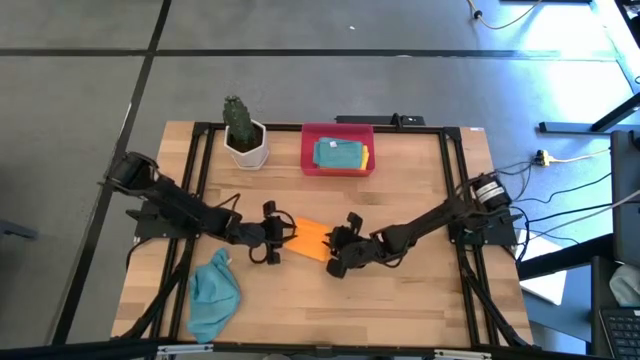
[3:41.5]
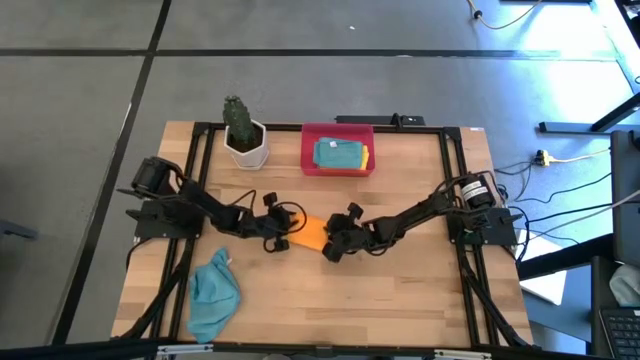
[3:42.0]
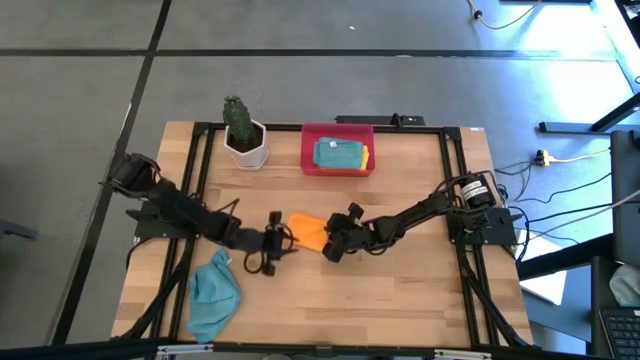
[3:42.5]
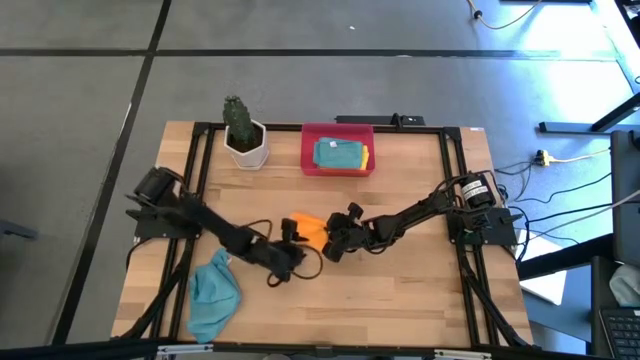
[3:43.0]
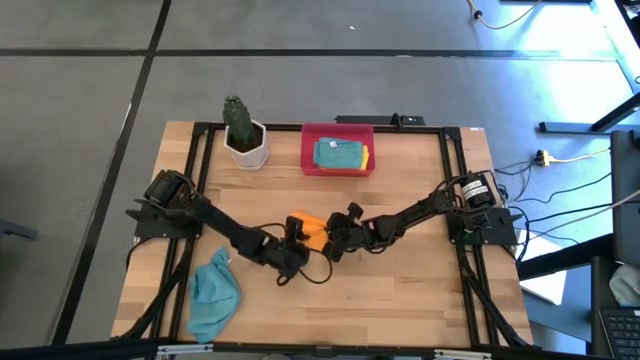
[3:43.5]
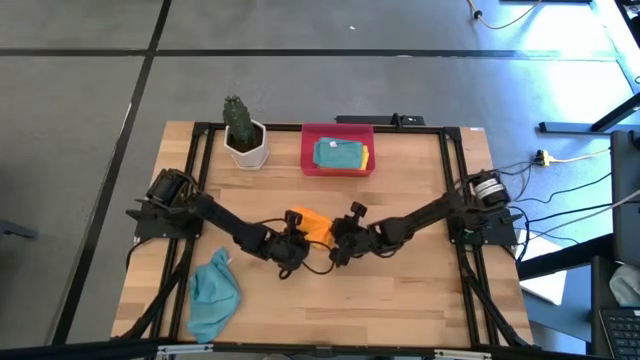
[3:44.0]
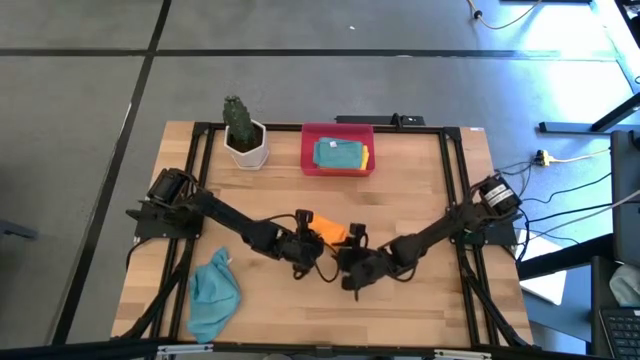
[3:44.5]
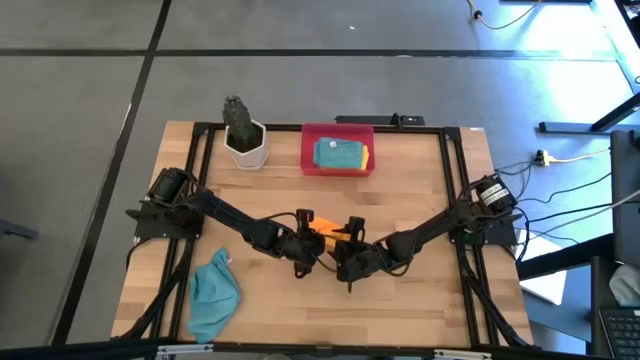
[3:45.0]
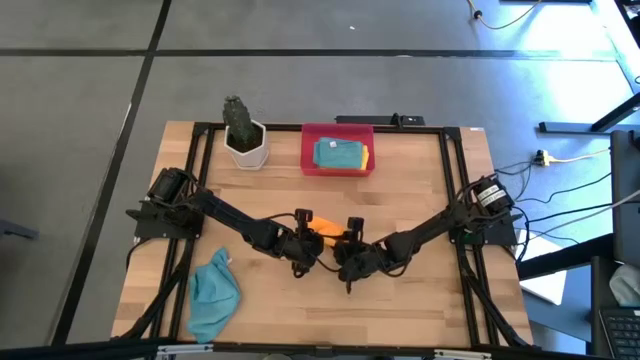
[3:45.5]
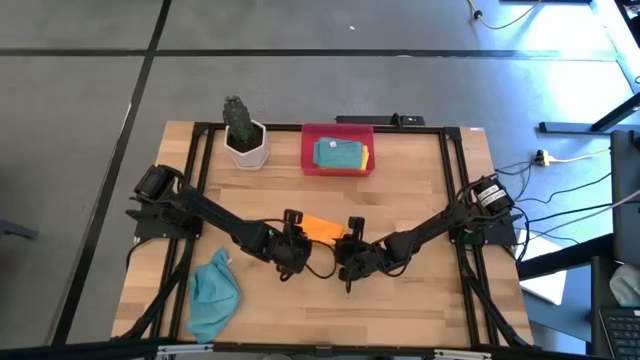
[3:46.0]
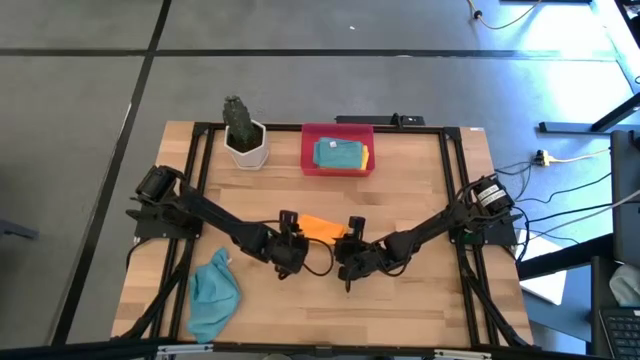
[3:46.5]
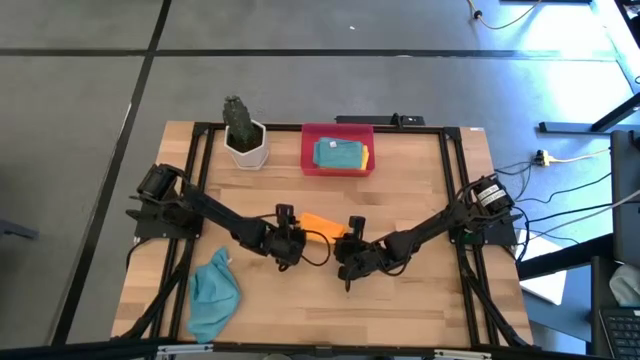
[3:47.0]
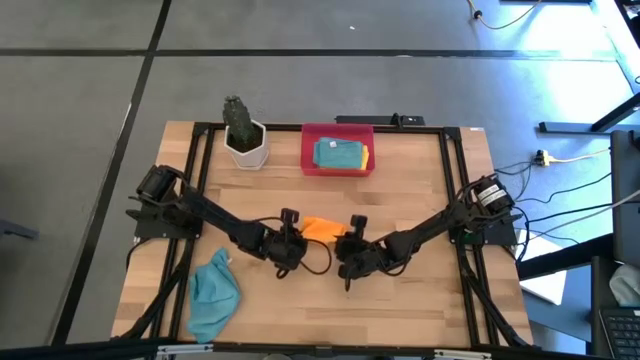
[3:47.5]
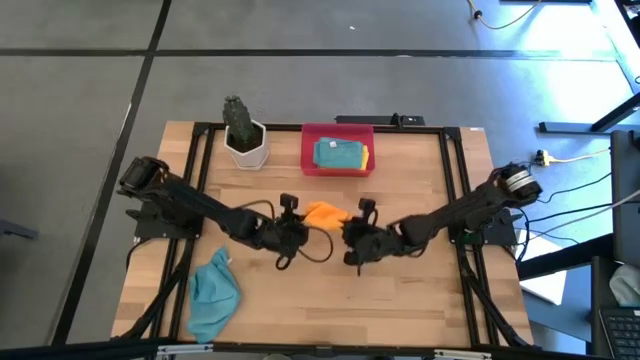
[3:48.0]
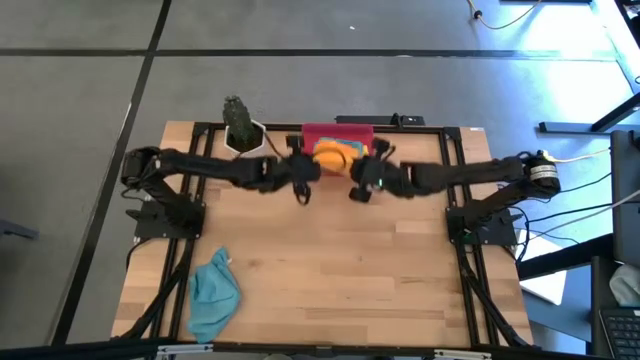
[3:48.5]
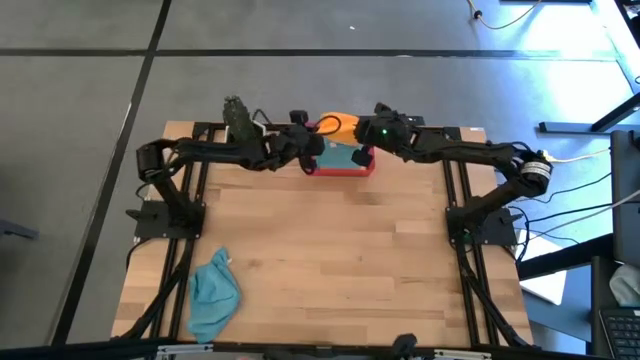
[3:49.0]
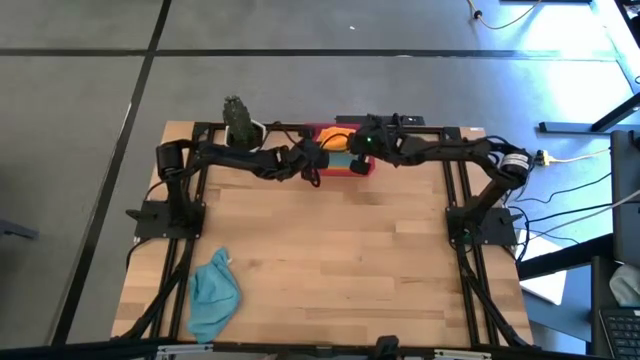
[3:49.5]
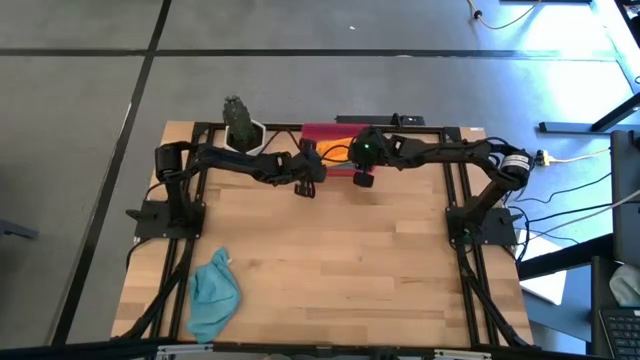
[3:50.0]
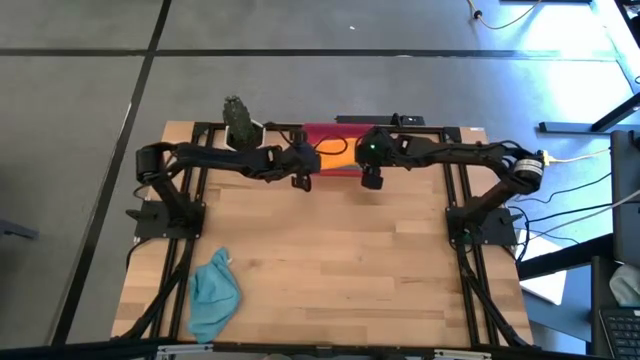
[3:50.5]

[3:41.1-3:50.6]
Task: Fold microfiber towels
Put the orange microfiber cloth into the red bin

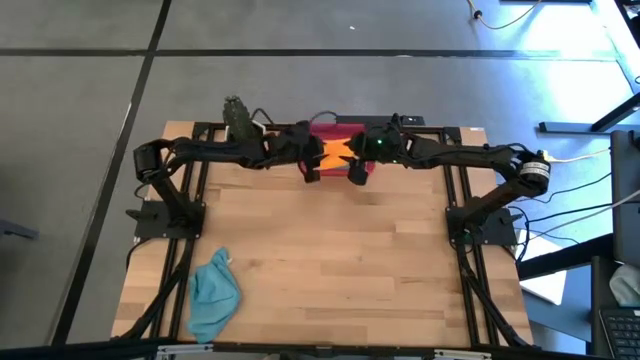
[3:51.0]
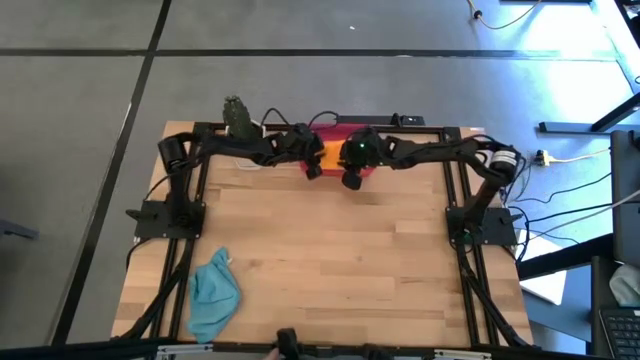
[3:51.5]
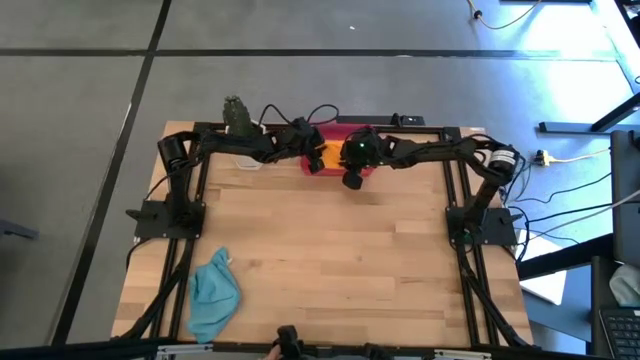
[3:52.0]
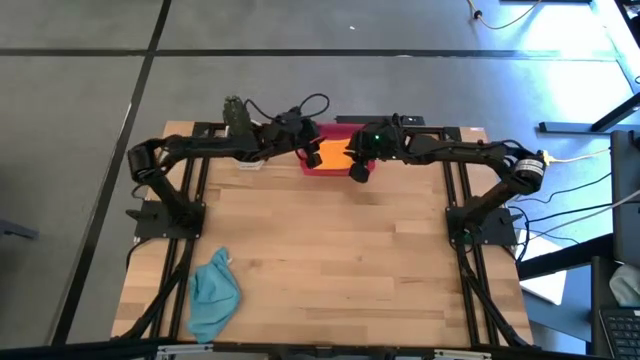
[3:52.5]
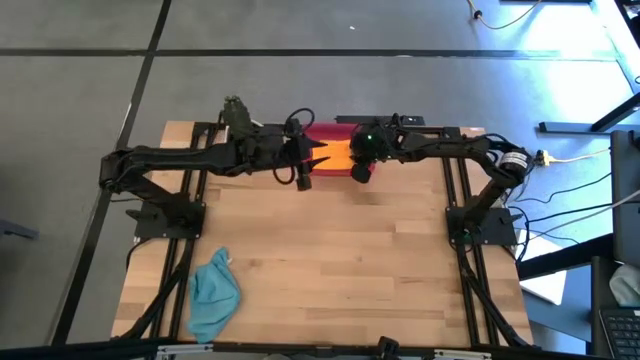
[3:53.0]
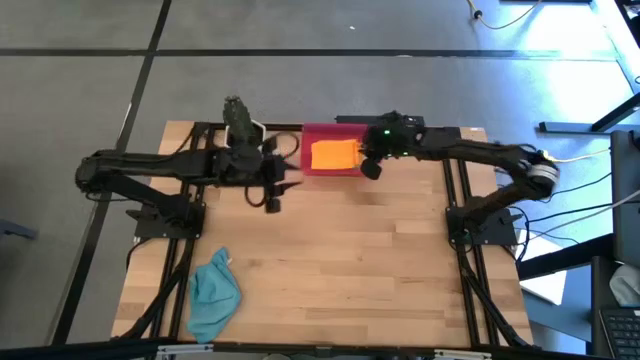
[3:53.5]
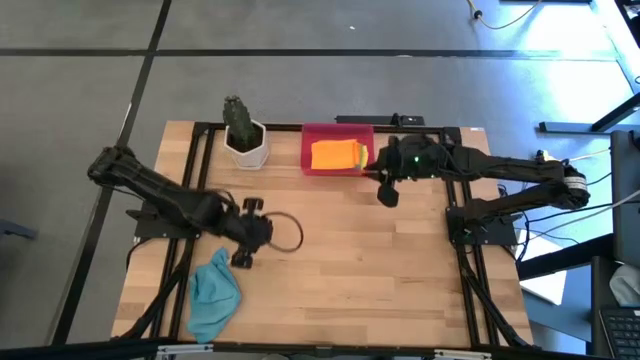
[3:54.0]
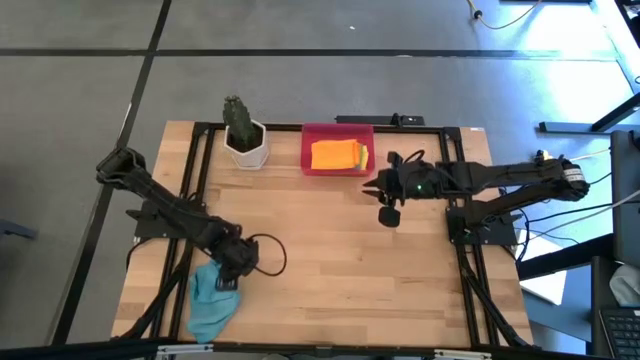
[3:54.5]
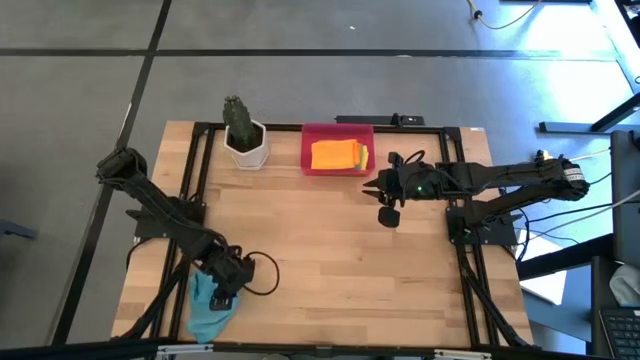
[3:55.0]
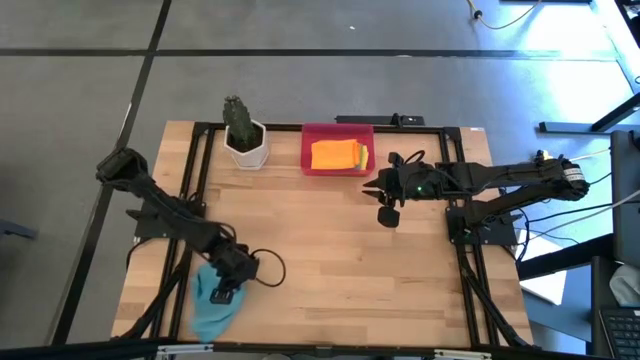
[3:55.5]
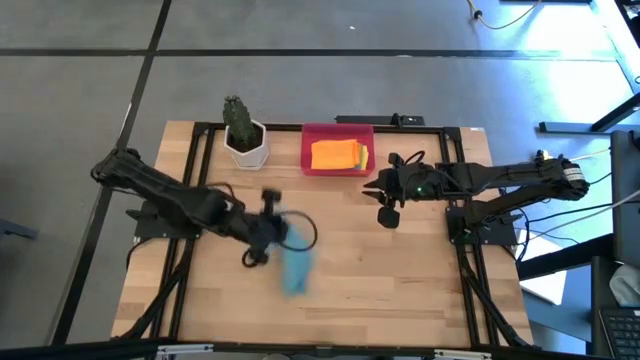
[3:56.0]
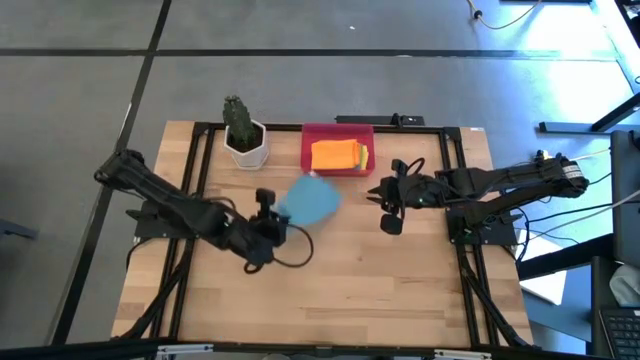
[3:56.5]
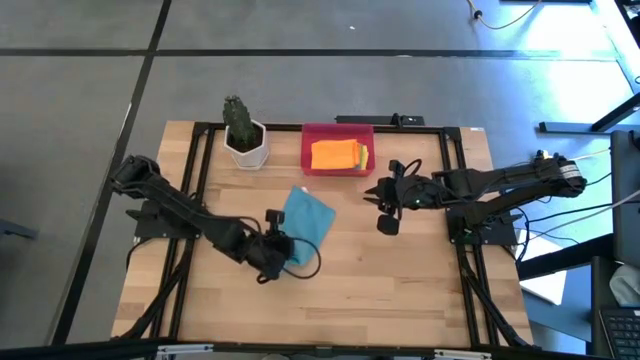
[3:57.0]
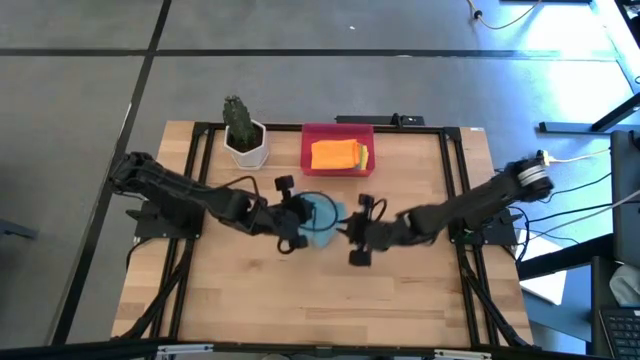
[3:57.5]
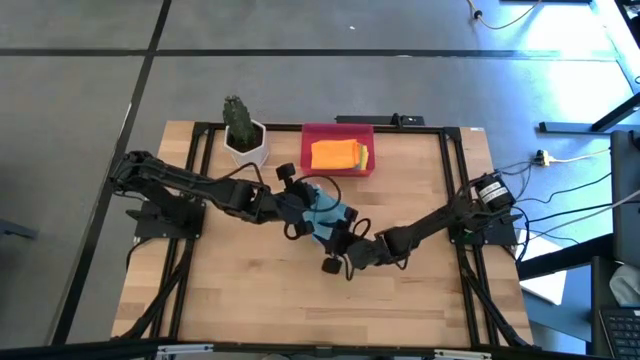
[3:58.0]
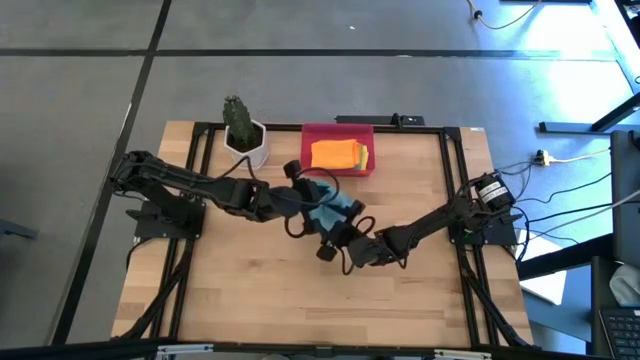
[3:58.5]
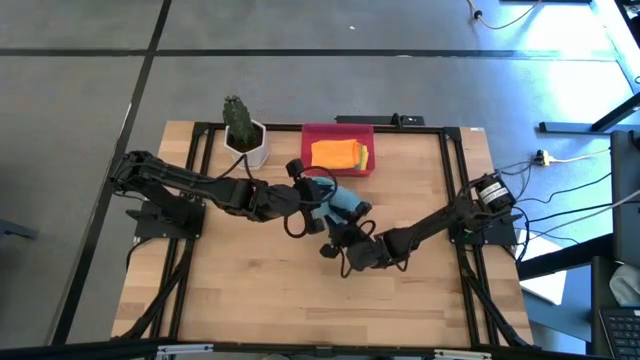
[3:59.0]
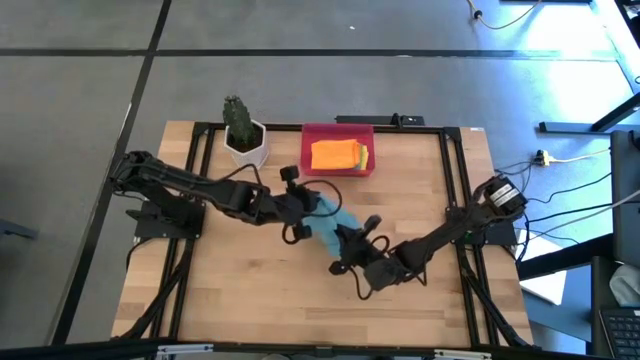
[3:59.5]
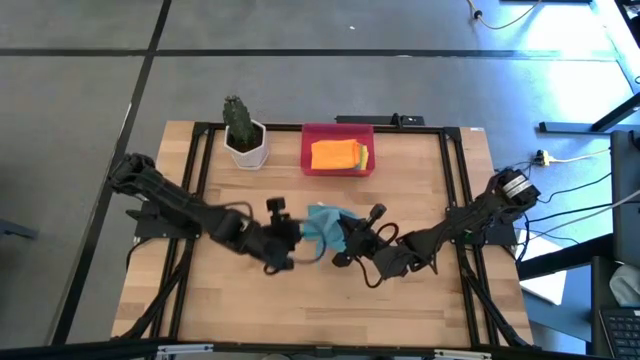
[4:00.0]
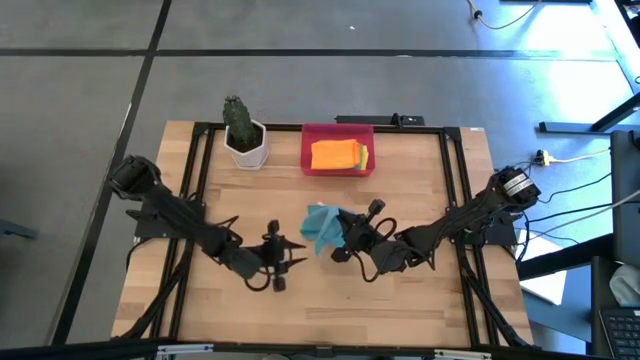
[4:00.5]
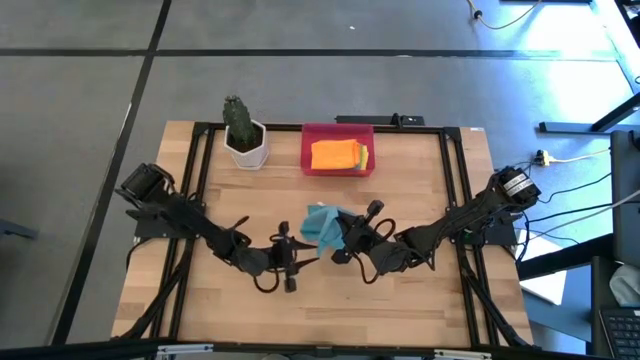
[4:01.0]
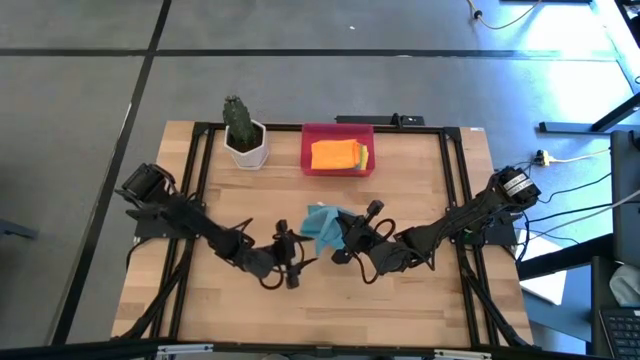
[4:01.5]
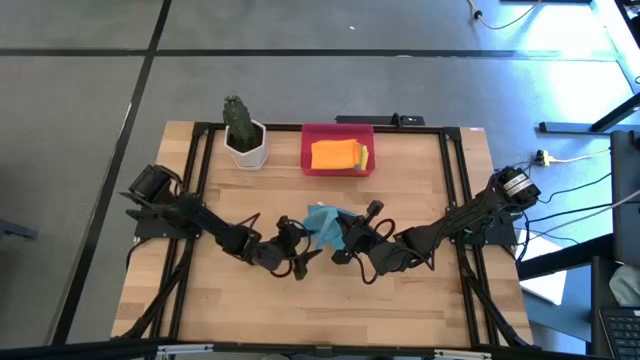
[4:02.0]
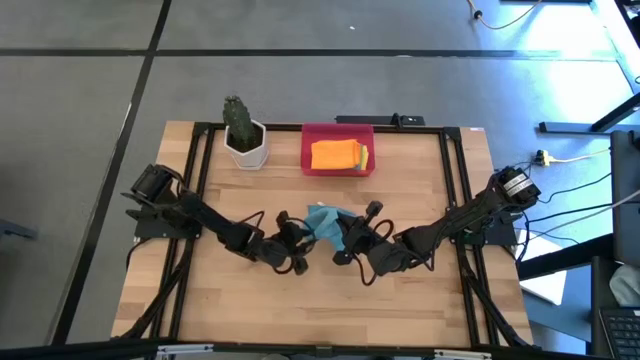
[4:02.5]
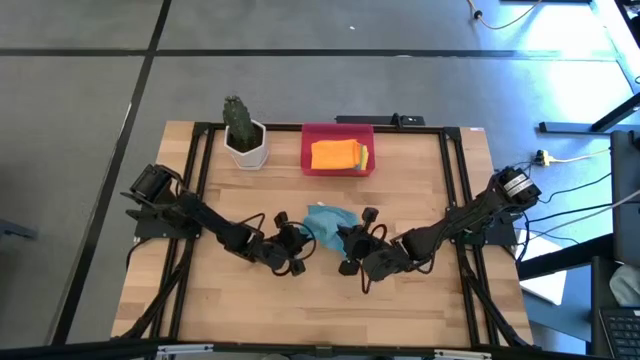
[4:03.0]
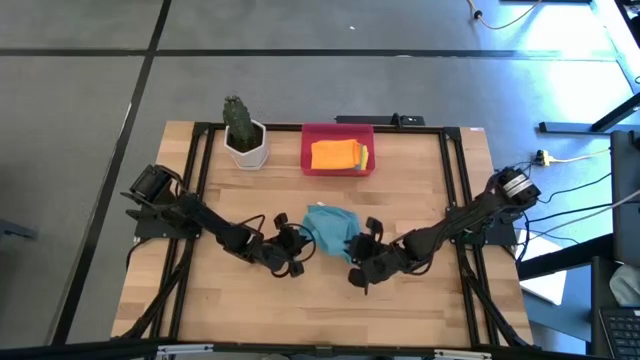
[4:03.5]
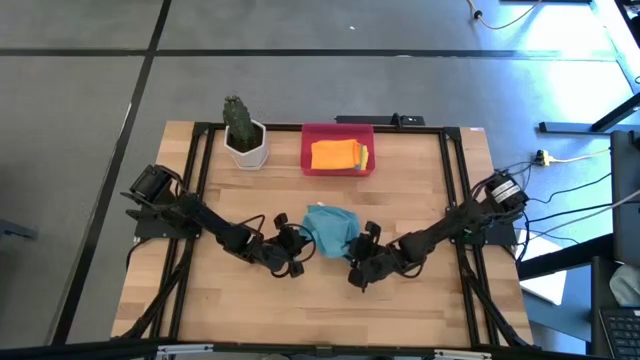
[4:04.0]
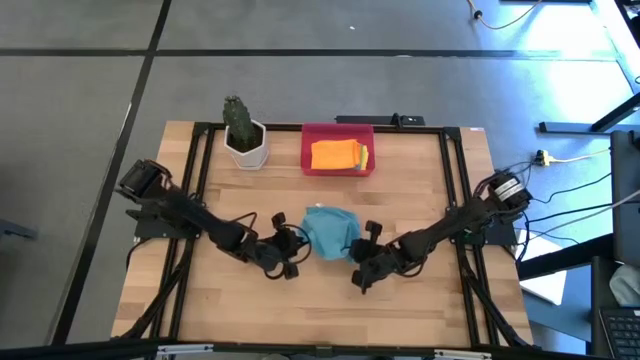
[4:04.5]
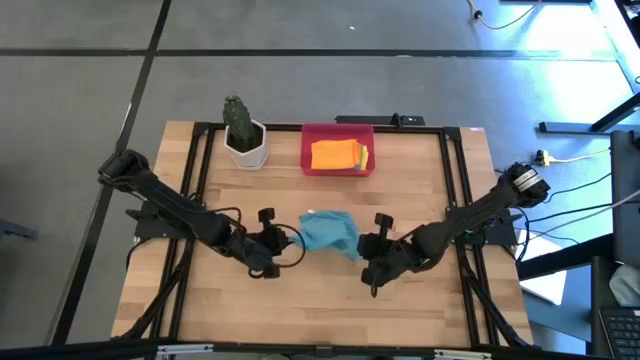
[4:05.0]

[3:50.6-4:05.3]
Fold the blue microfiber cloth
